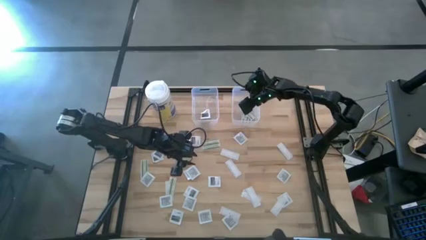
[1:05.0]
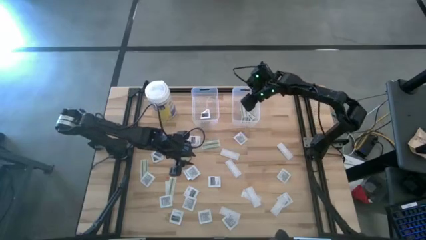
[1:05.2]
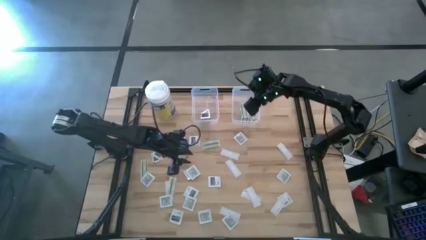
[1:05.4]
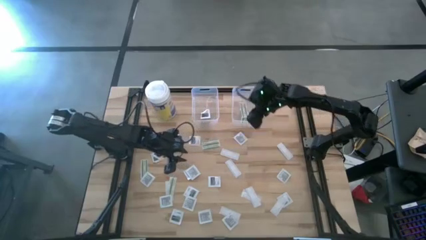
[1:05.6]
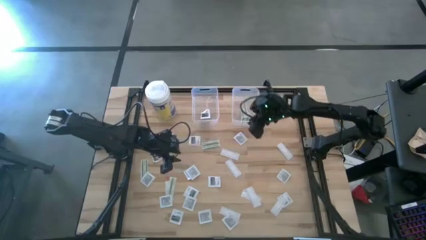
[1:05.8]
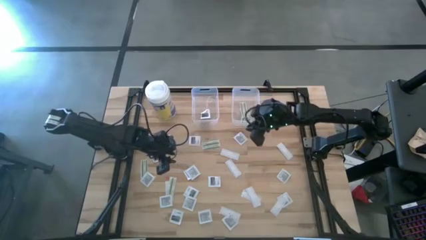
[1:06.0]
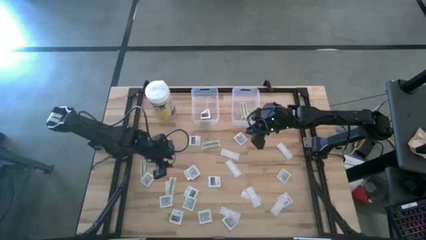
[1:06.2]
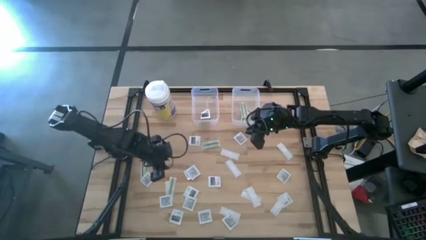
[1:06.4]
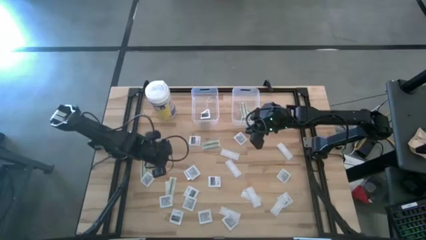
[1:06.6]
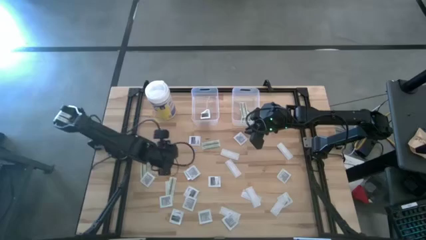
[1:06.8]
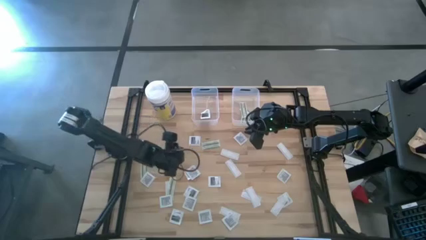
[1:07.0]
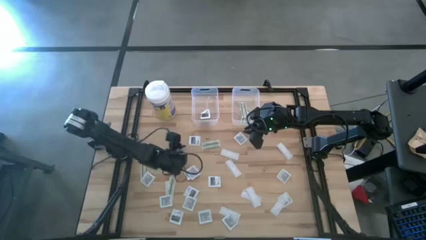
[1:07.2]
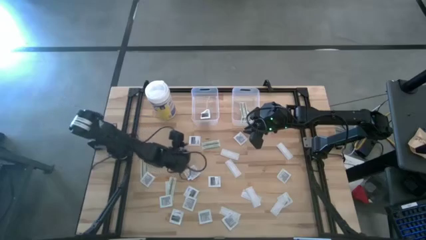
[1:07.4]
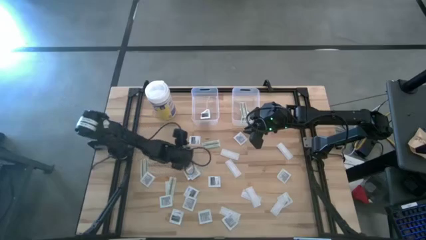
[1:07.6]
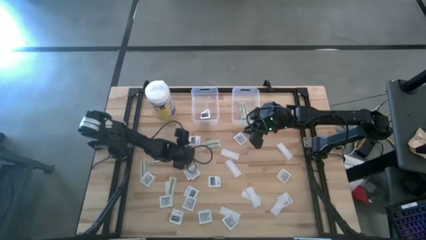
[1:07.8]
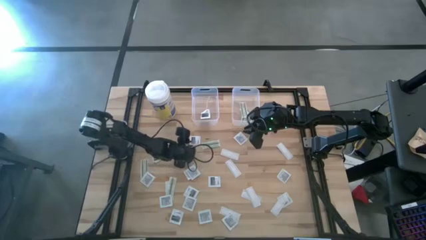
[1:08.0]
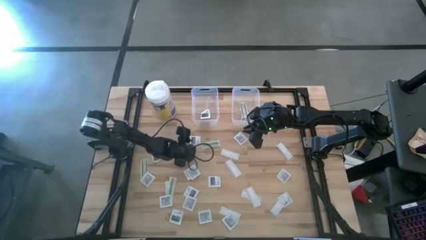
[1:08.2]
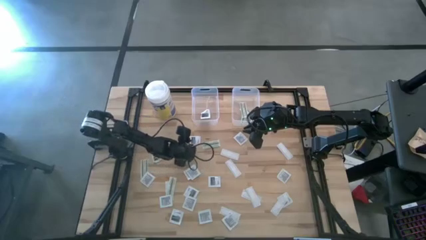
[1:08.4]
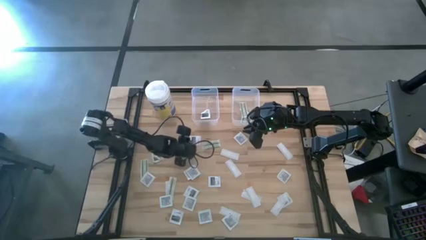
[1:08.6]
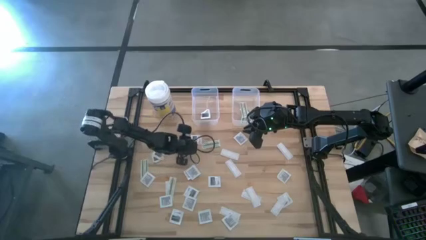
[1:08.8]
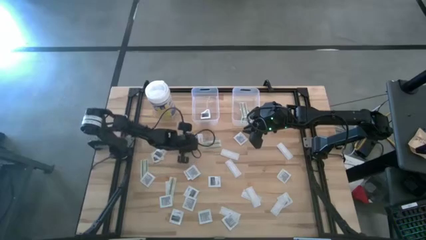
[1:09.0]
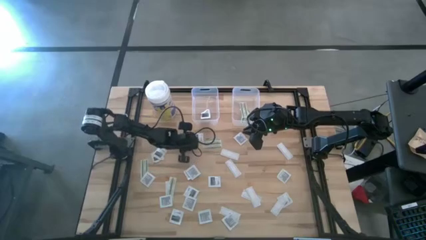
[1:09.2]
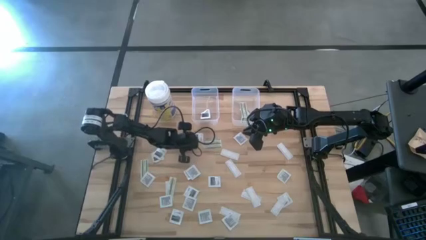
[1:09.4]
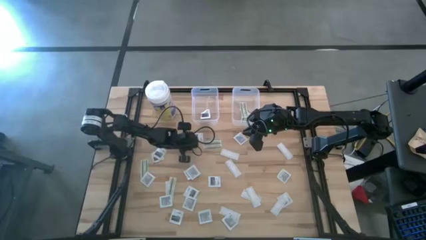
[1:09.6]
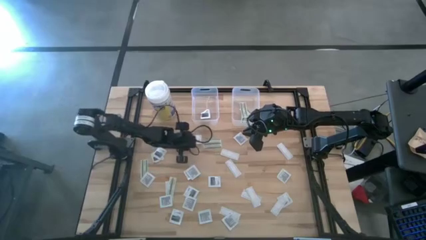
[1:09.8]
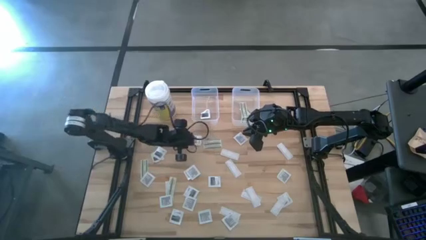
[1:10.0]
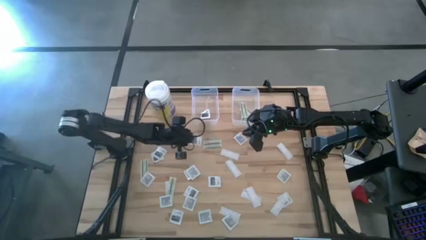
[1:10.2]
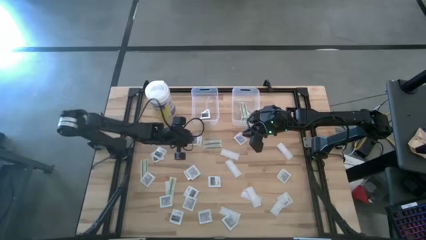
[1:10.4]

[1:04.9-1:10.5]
Task: Pick & Place First Aid Supplies
Put the towelette pack into the left transparent bin

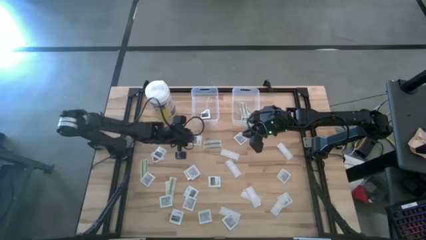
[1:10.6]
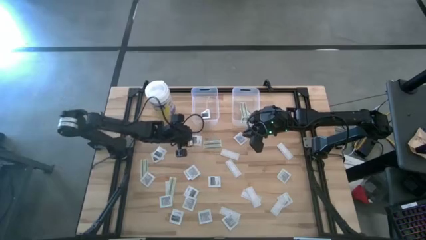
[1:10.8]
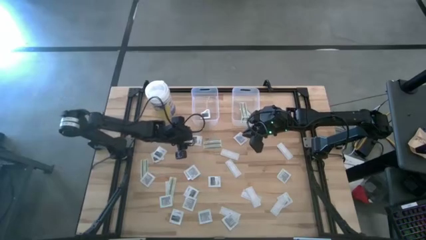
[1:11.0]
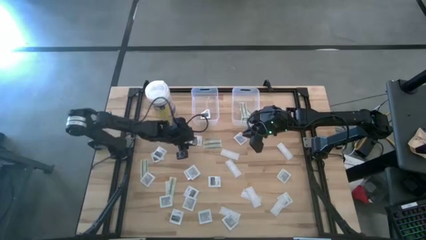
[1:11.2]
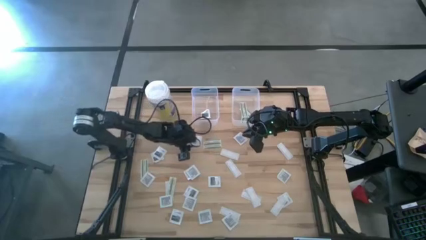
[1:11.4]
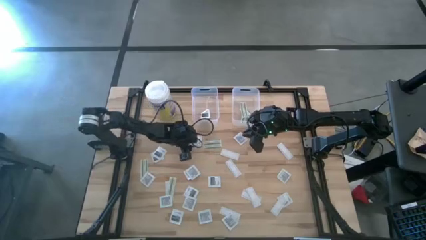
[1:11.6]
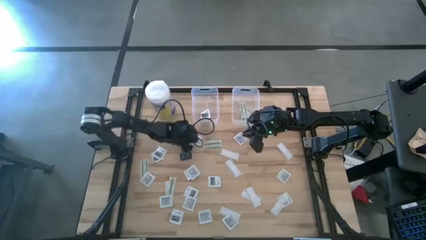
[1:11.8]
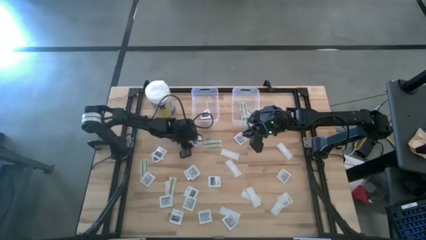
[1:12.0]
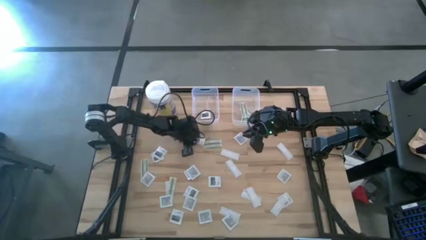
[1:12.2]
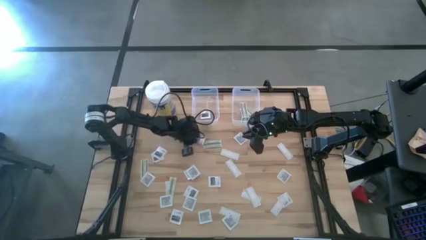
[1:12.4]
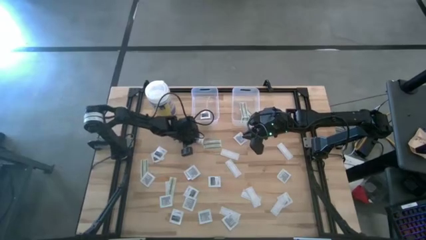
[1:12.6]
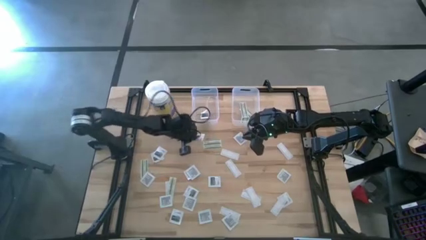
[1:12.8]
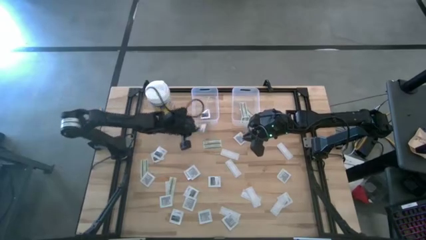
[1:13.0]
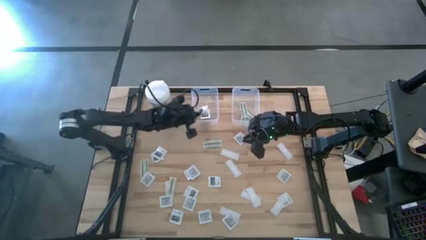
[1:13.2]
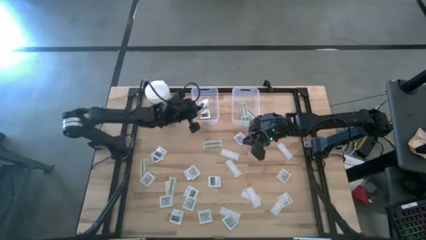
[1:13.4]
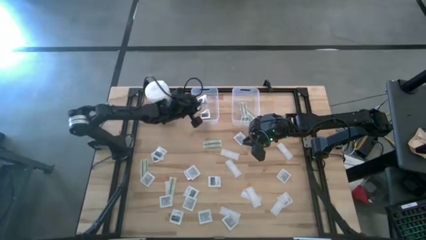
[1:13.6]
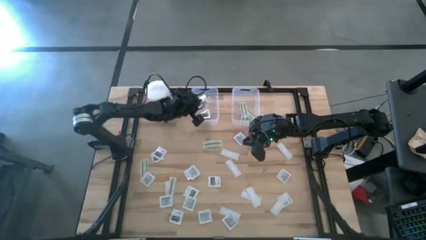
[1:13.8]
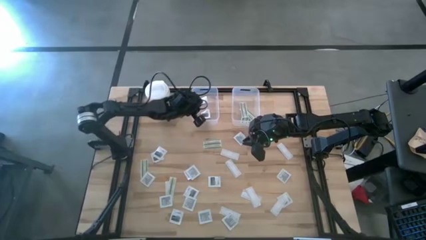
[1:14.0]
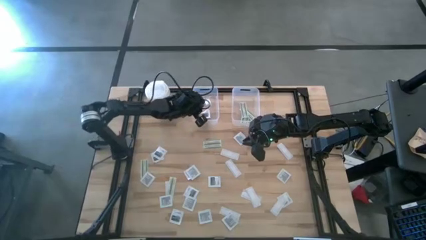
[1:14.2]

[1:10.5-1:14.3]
Put the towelette pack into the left transparent bin

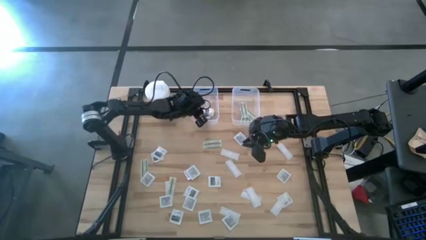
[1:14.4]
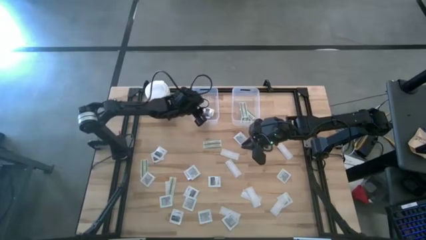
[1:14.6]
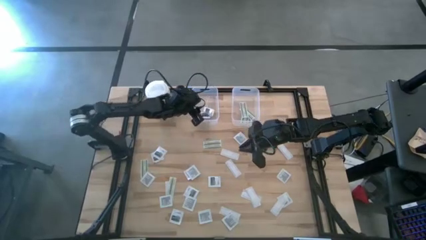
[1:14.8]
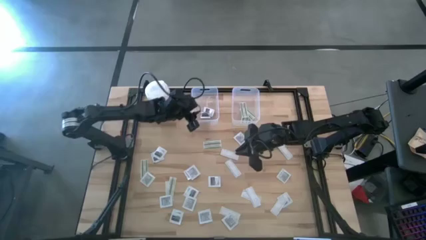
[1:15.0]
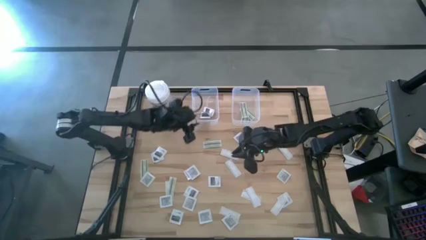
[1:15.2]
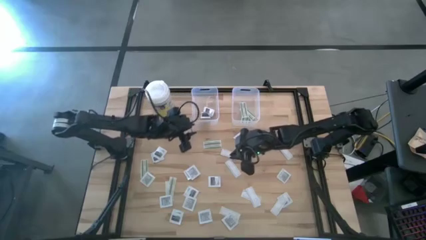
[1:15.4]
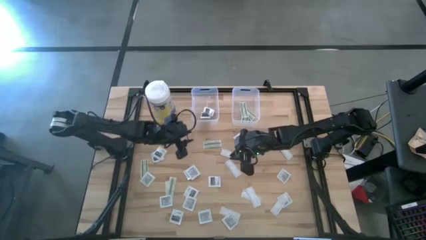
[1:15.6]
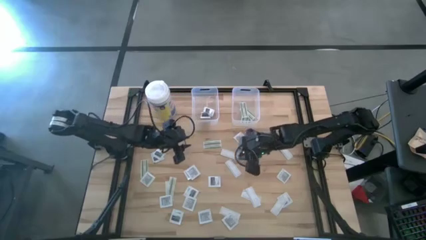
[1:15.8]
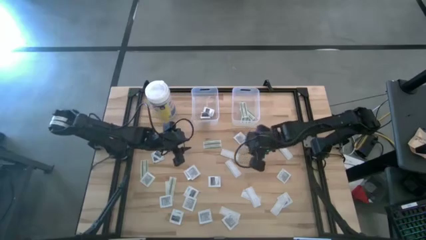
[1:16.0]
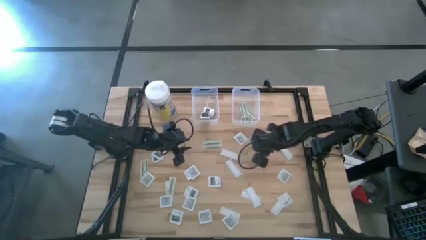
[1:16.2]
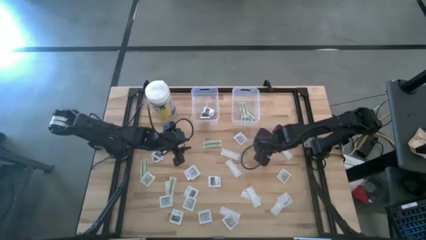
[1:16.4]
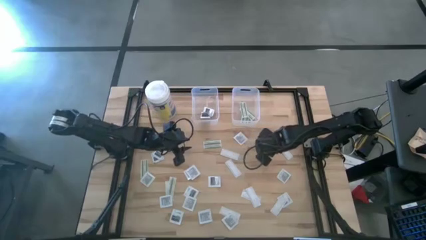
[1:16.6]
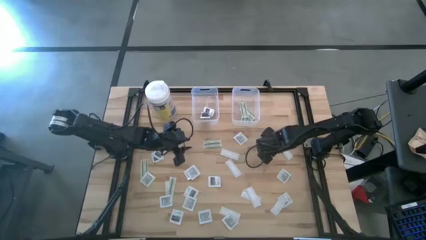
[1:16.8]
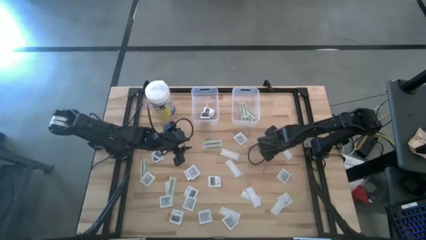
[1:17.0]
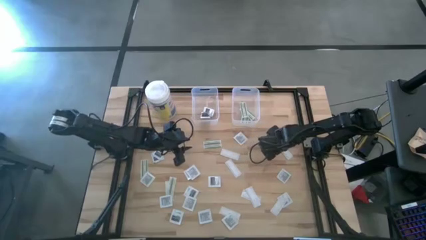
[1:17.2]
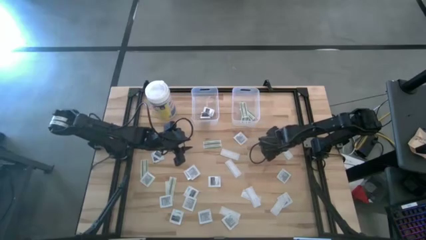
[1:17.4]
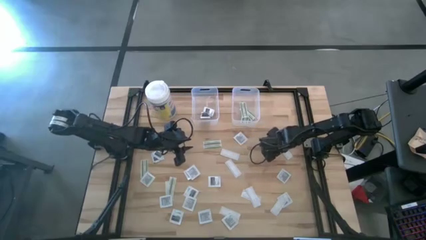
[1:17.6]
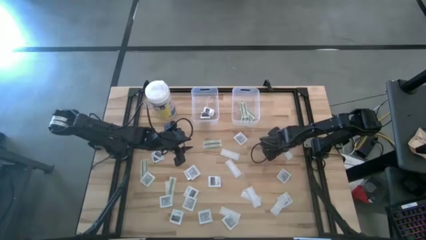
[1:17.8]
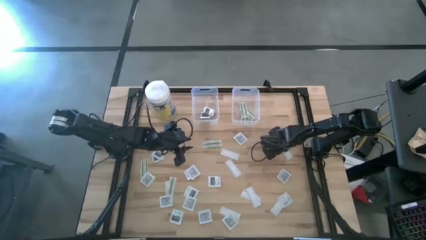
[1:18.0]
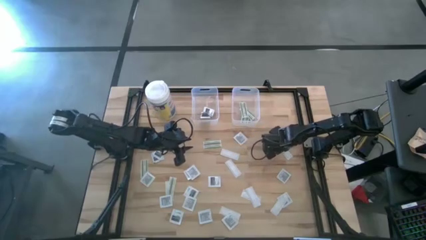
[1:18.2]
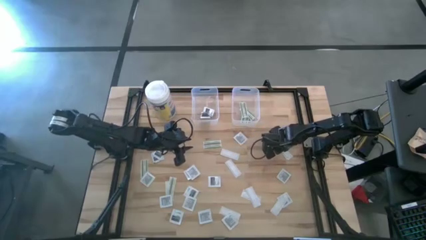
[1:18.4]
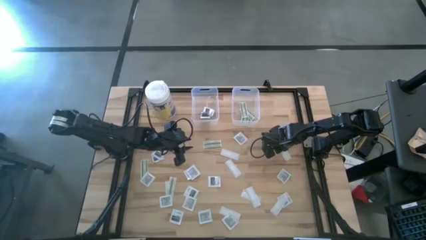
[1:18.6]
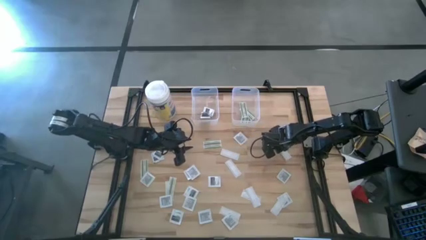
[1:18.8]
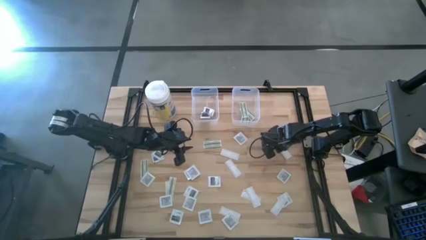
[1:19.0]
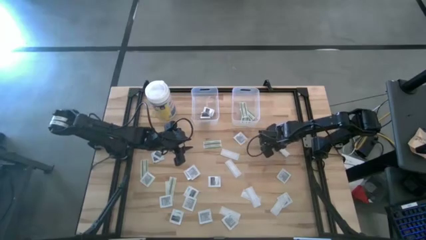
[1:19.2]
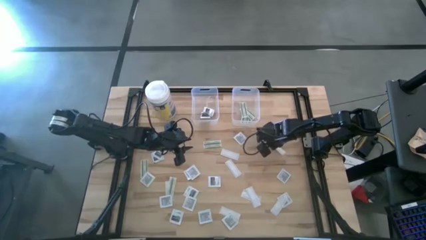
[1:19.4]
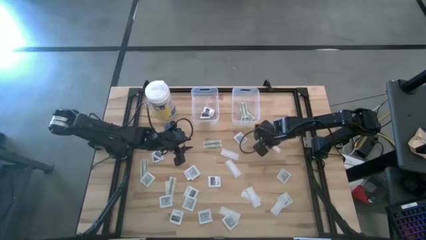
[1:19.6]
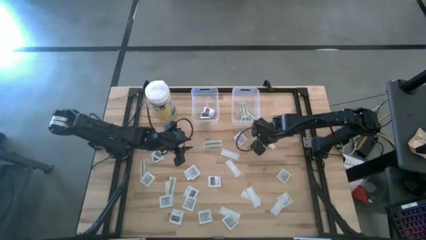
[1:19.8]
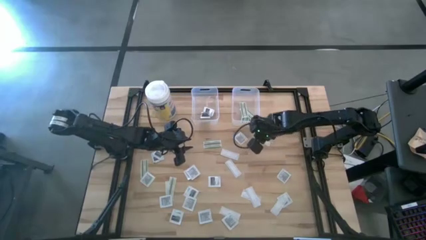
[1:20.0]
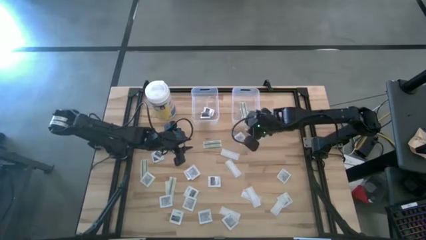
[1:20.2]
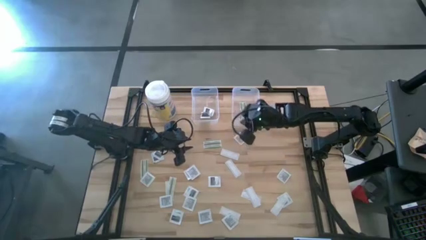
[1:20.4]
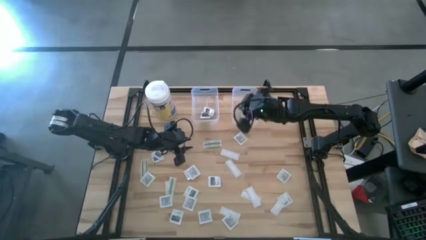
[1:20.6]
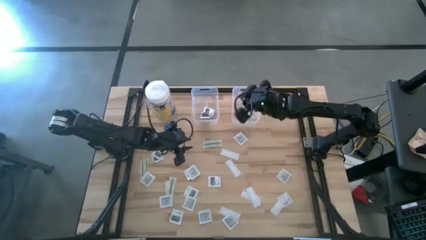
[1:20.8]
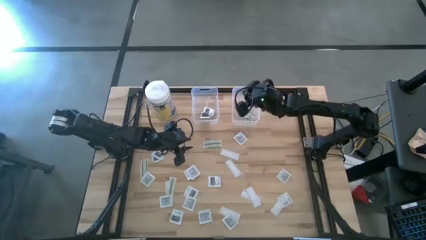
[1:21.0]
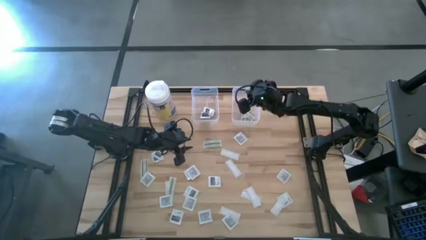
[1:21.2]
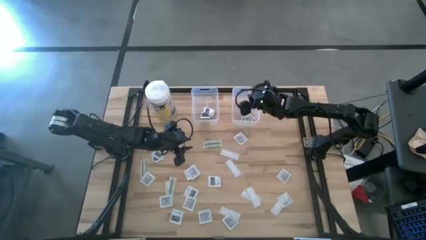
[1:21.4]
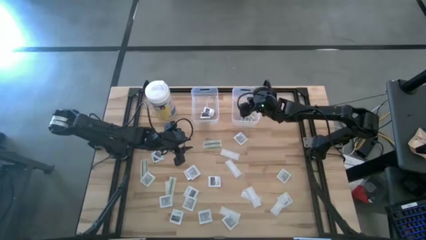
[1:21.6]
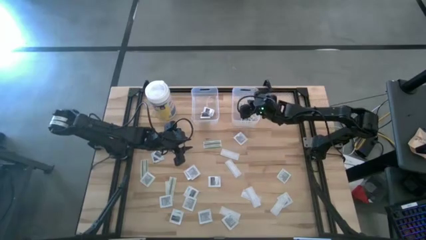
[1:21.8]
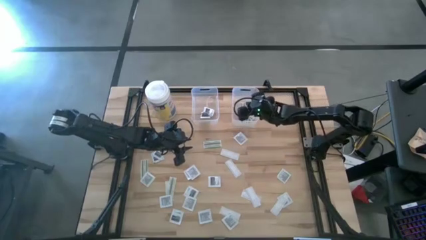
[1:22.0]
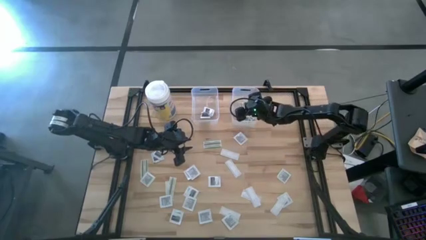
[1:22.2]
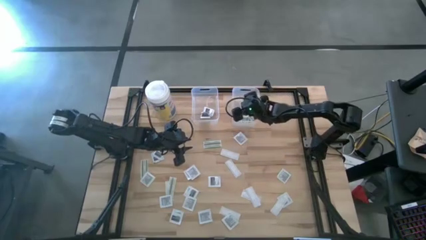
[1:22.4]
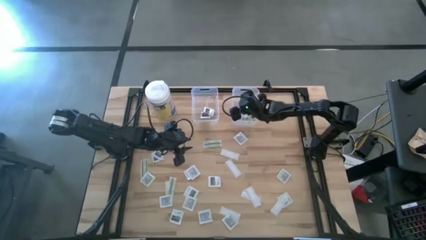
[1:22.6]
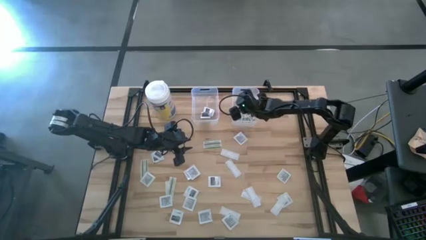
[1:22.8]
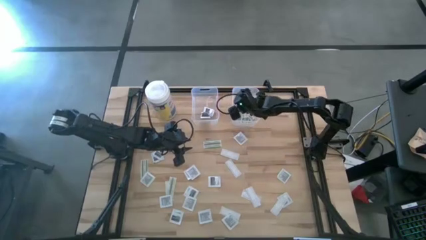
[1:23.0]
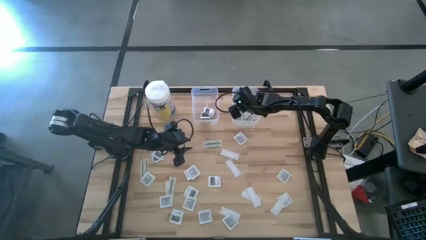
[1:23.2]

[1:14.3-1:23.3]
Put the bandage into the right transparent bin
